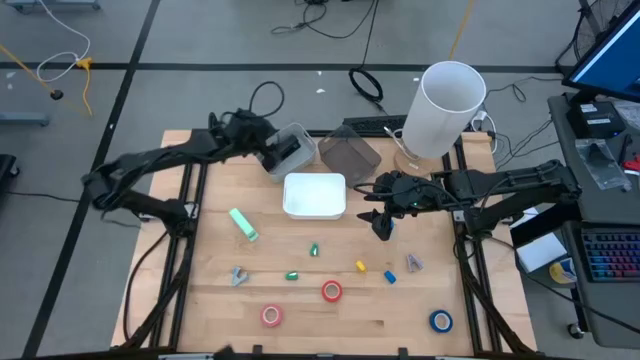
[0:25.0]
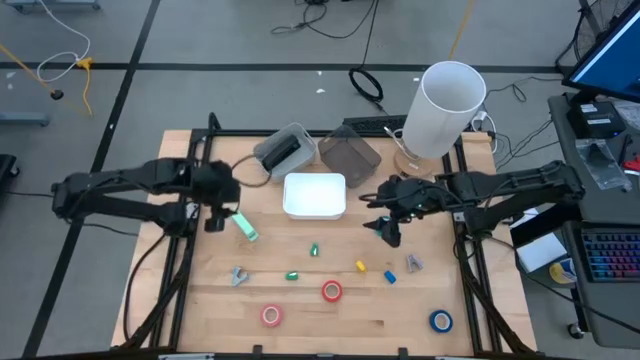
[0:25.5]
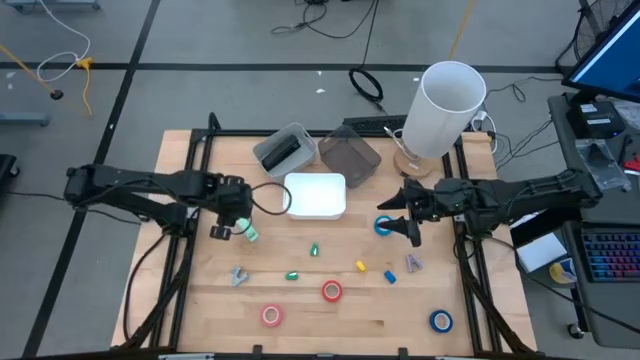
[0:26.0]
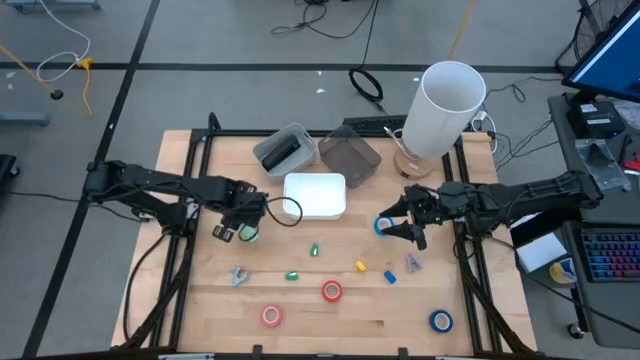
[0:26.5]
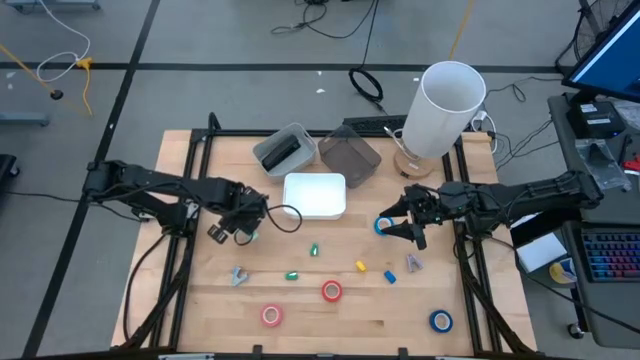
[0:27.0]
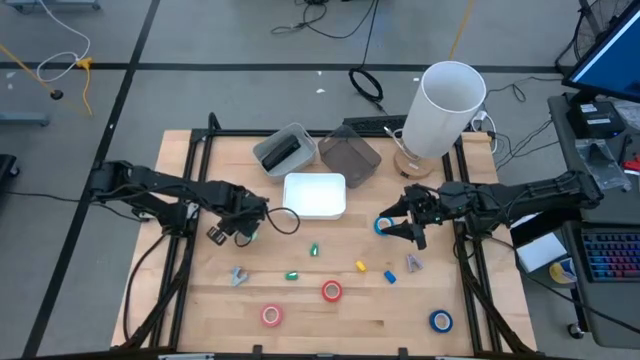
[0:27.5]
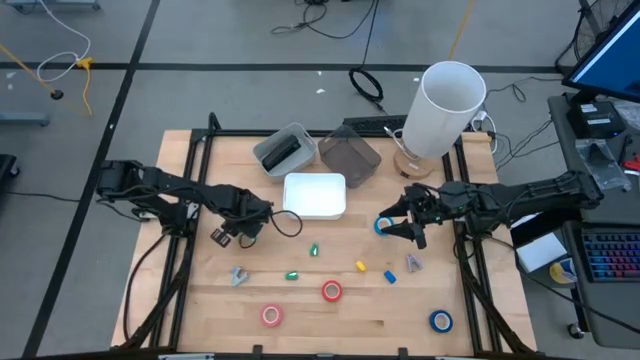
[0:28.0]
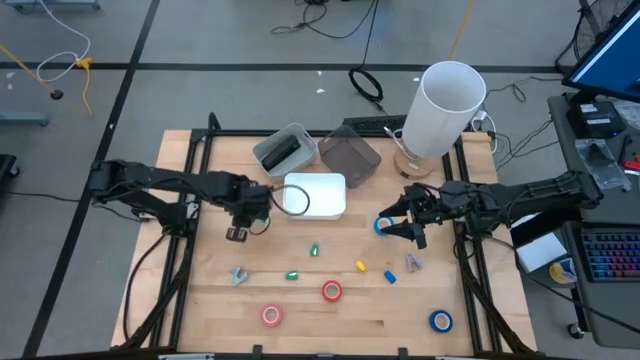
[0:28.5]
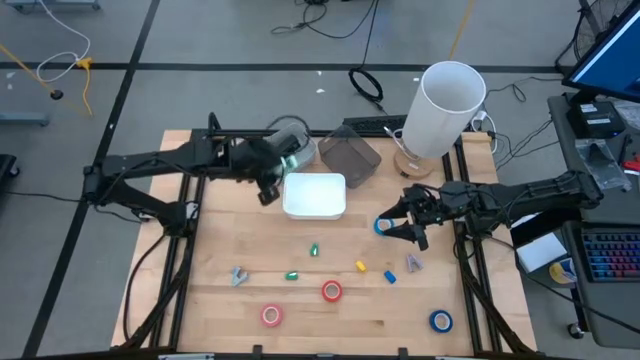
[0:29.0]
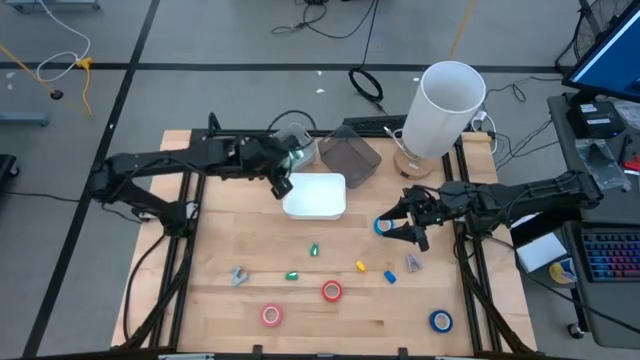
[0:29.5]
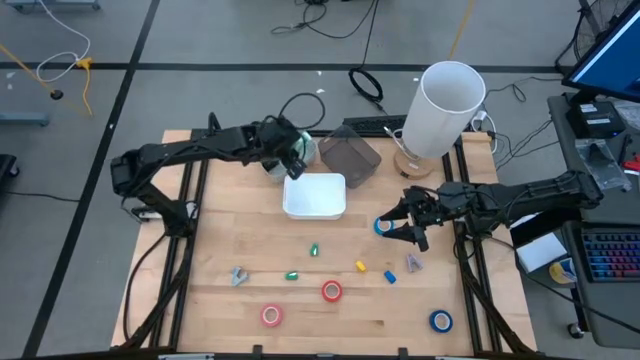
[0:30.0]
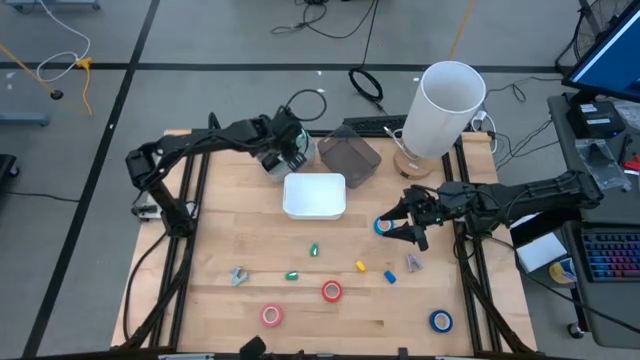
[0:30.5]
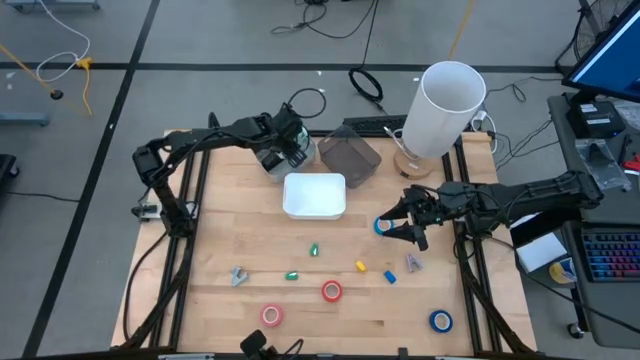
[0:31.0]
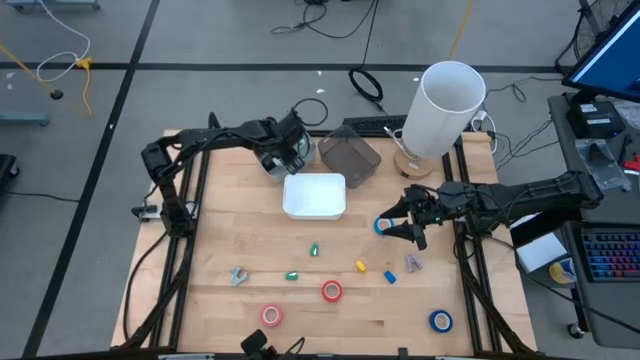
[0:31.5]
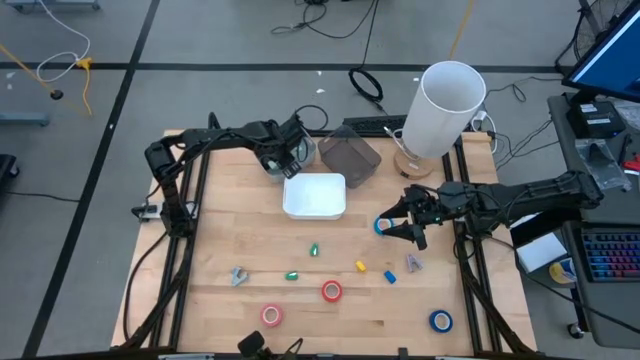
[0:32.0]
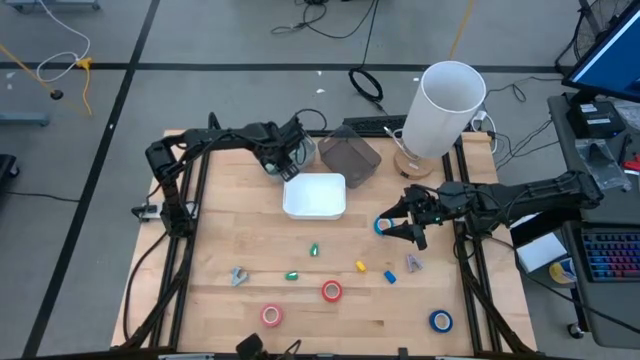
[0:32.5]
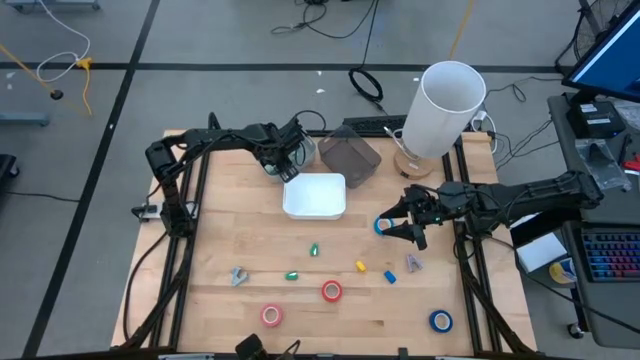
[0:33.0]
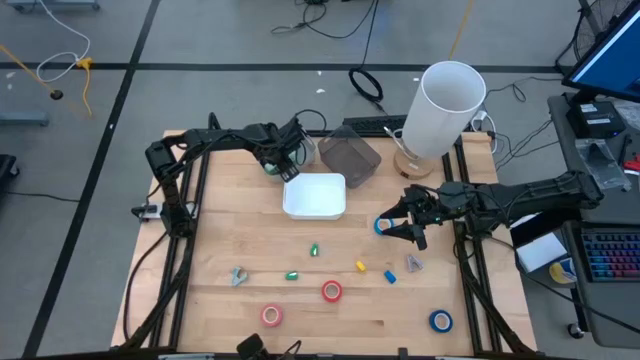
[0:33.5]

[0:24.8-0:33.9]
Task: Pick and place Stapler, Stapler remover, tape
Put the light blue stapler into the gray bin

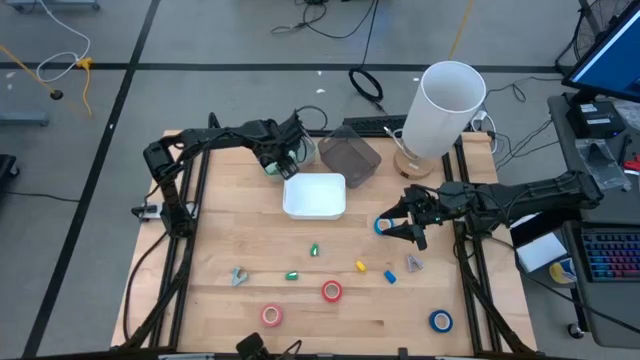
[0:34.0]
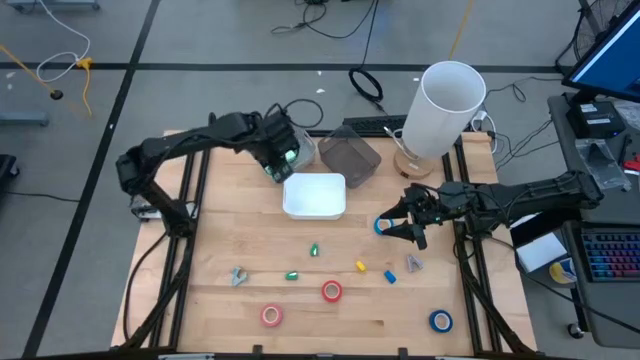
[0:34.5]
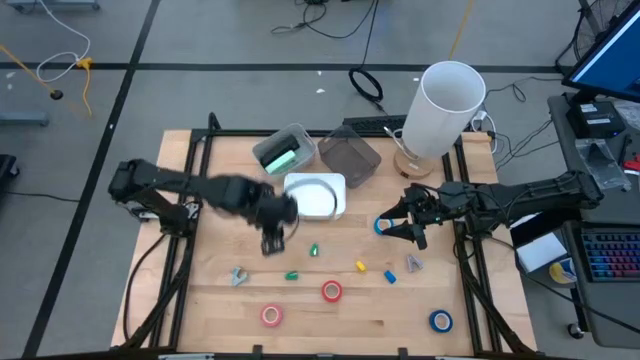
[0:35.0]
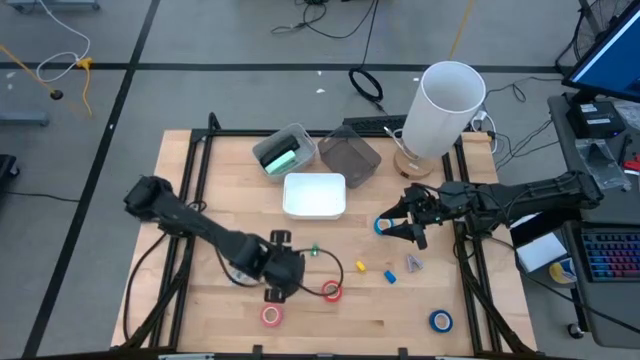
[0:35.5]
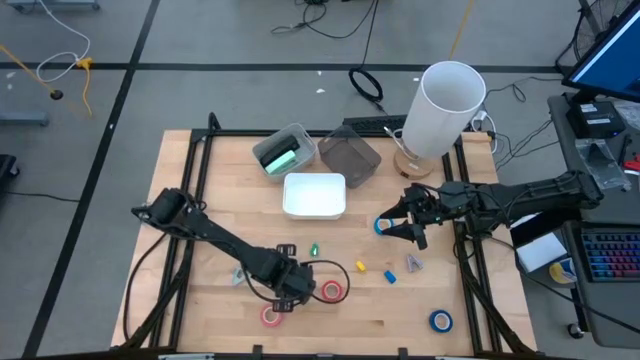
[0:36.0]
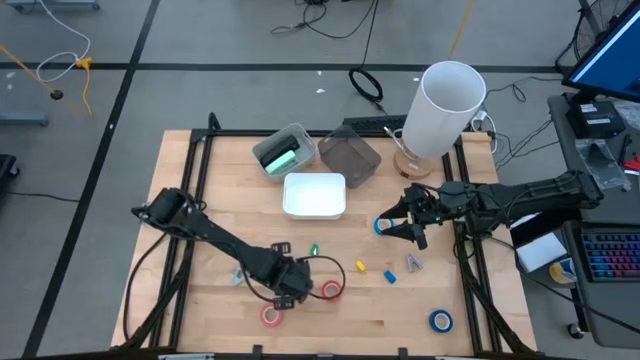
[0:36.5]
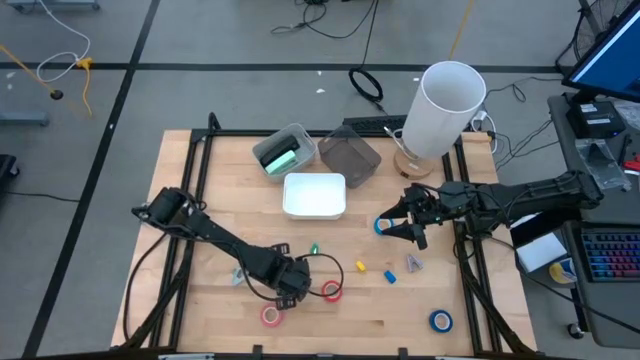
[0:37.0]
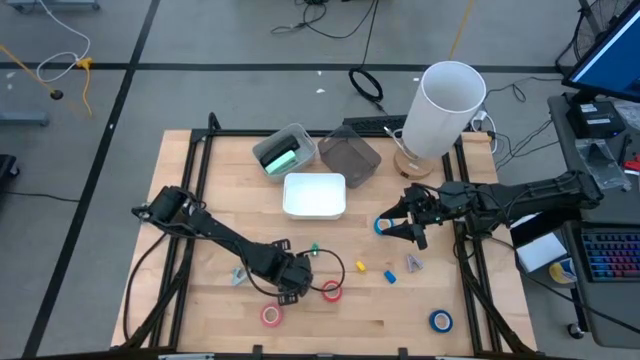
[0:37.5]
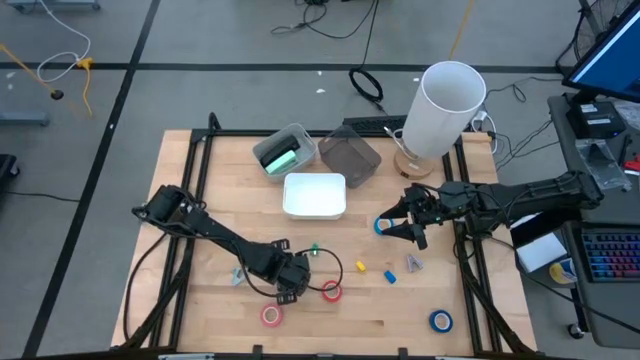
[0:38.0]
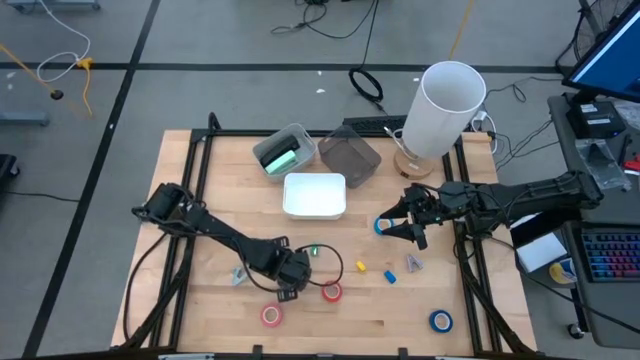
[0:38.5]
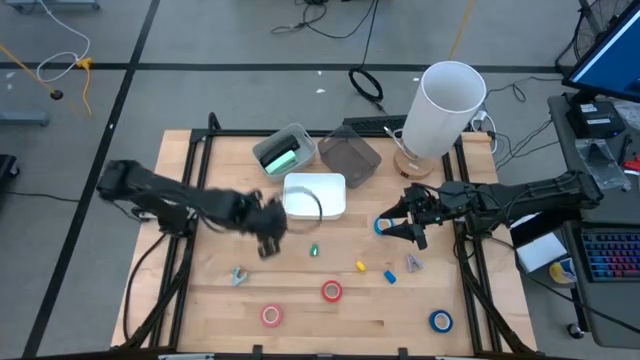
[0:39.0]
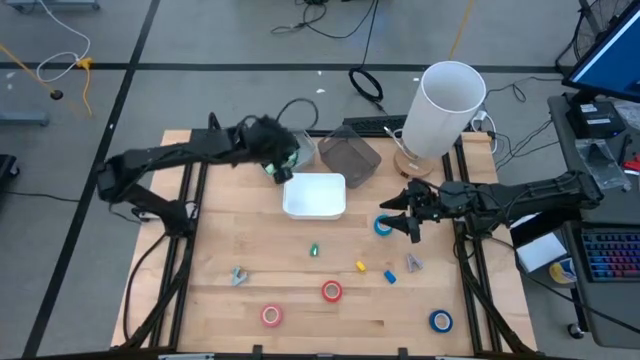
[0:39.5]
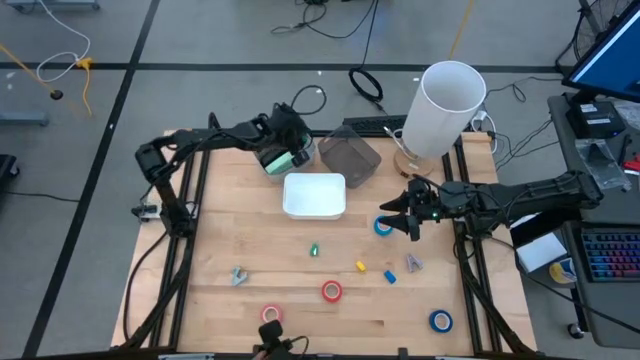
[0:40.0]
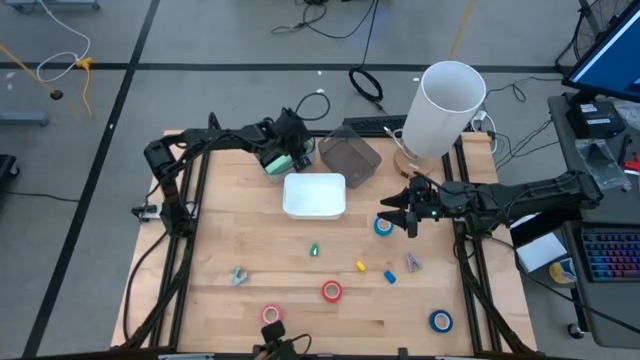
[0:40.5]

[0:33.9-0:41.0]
Put the bottom green stapler into the gray bin

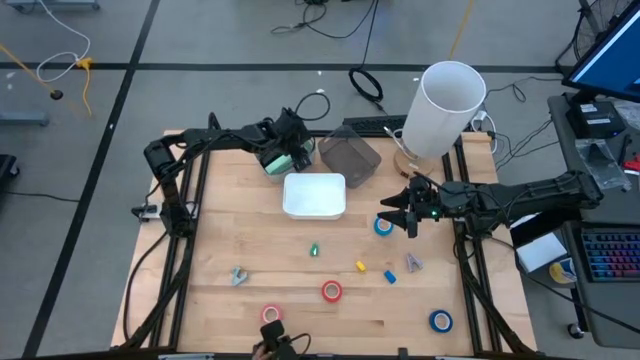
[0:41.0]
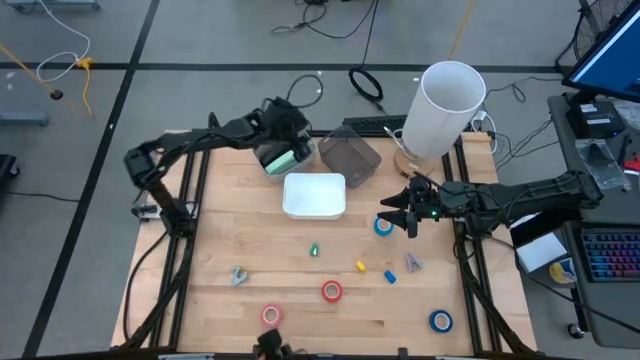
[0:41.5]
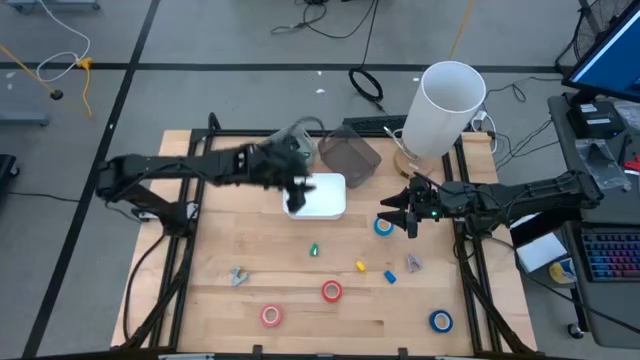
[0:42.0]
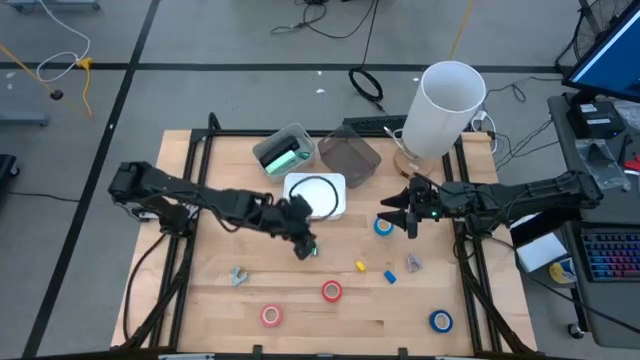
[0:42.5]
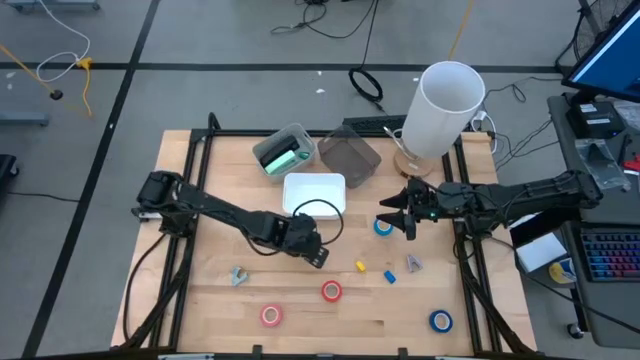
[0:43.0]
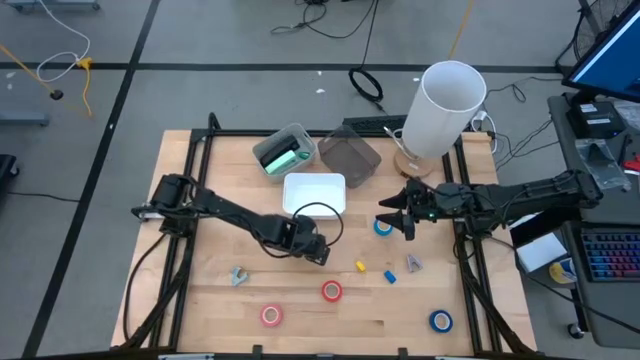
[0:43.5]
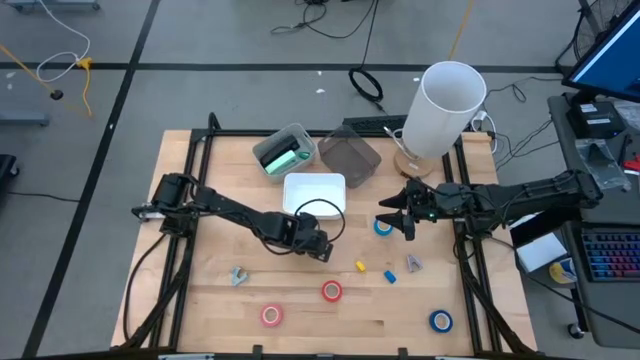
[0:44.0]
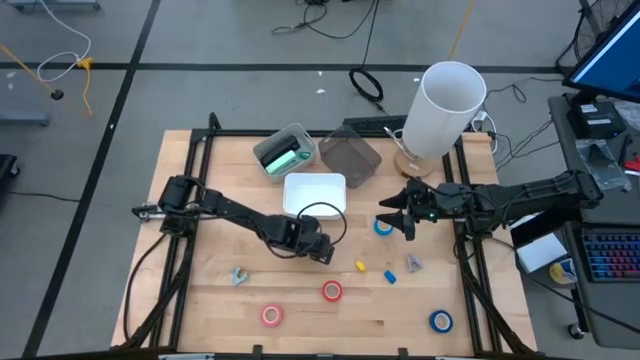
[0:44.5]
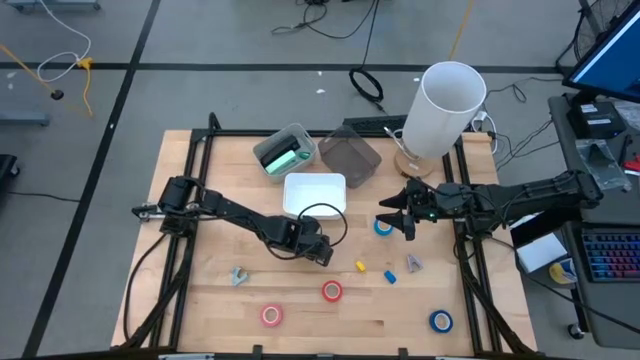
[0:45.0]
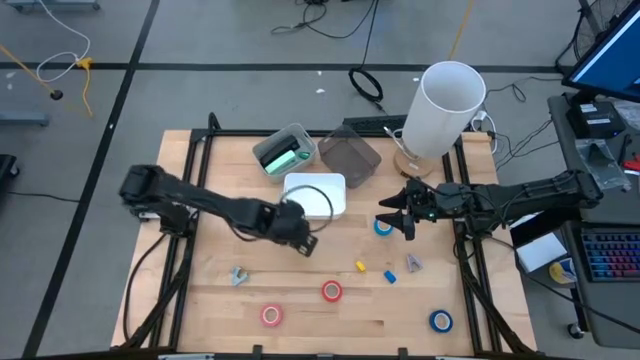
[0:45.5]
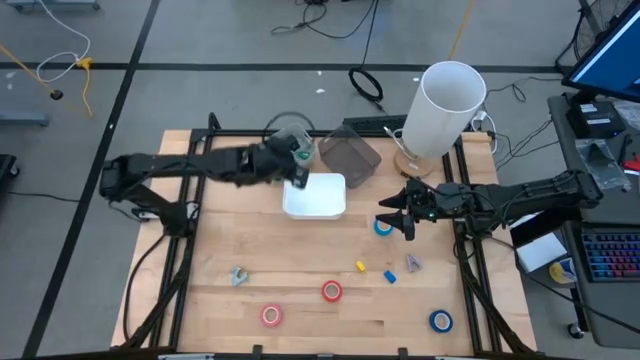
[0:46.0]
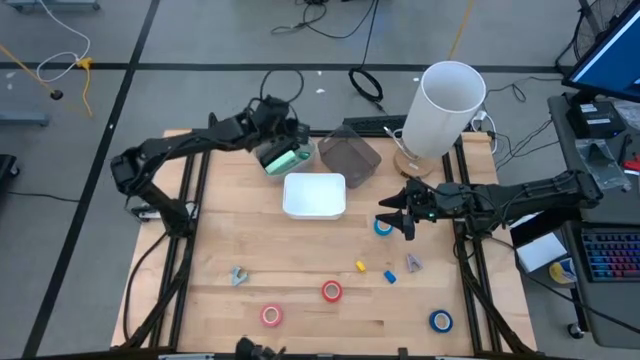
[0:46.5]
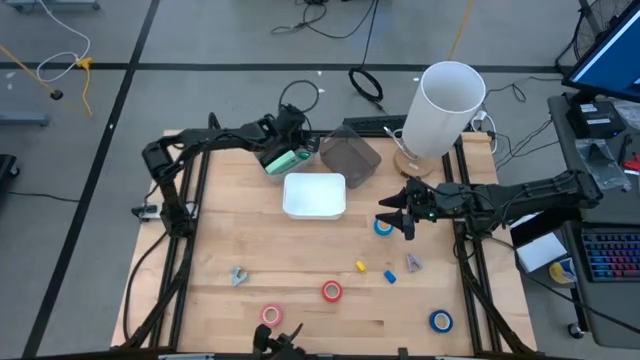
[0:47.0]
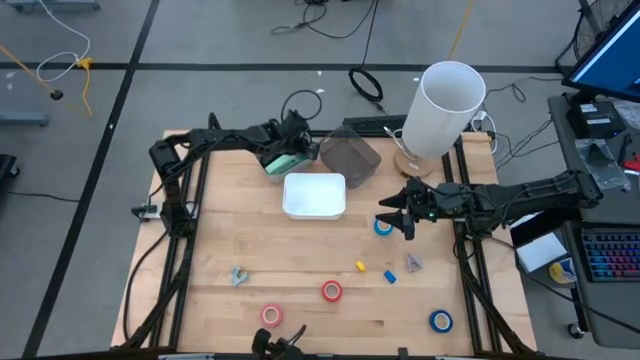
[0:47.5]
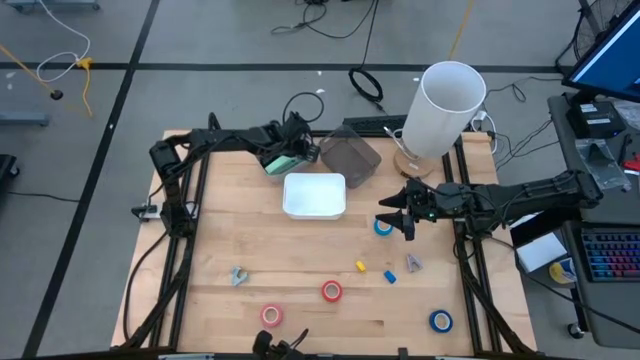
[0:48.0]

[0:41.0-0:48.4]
Put the green stapler into the gray bin
